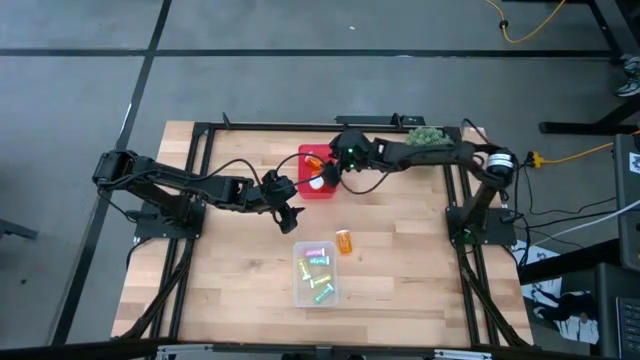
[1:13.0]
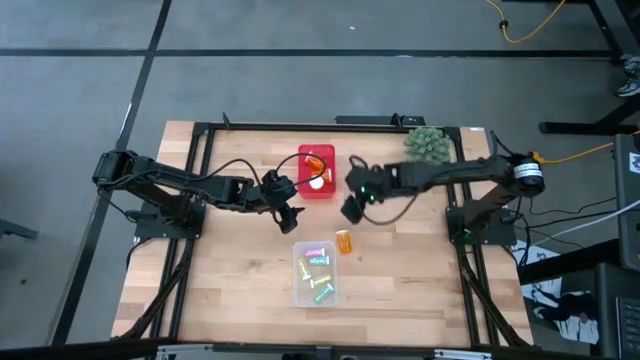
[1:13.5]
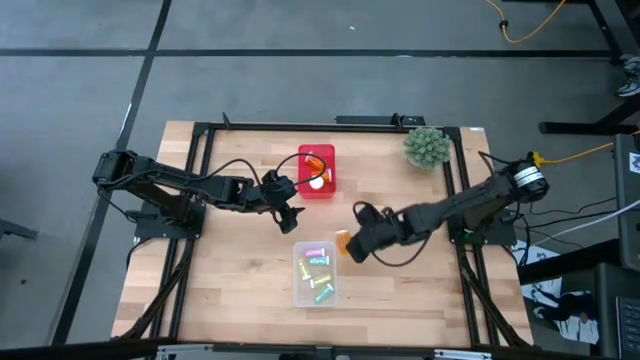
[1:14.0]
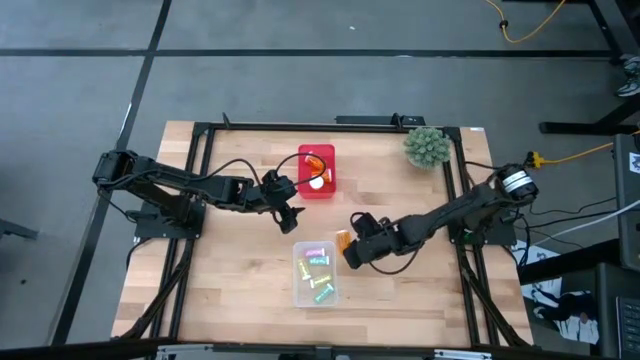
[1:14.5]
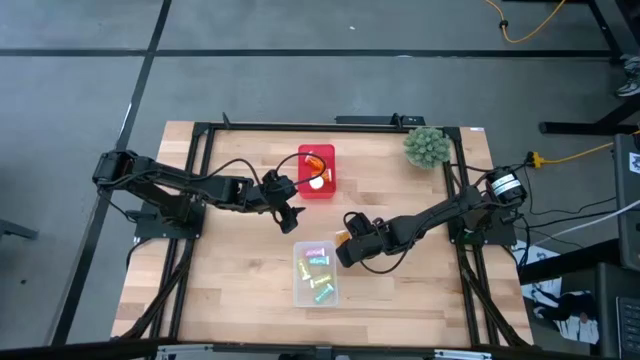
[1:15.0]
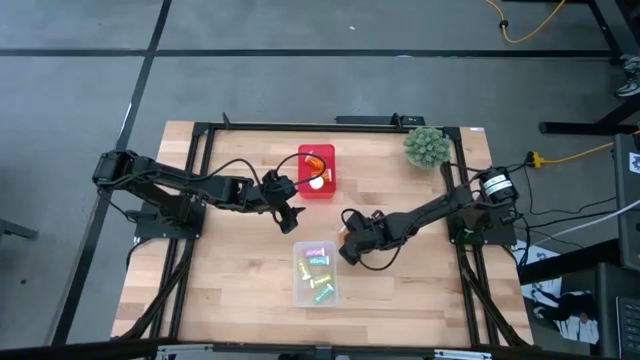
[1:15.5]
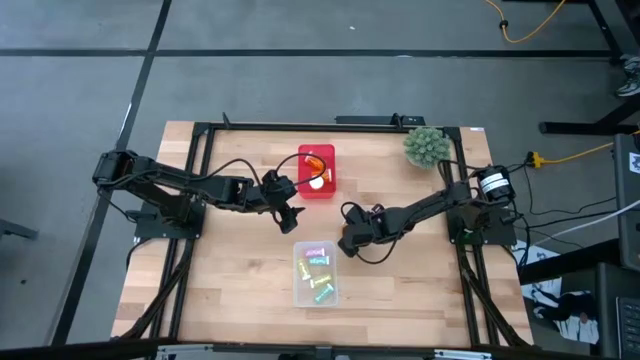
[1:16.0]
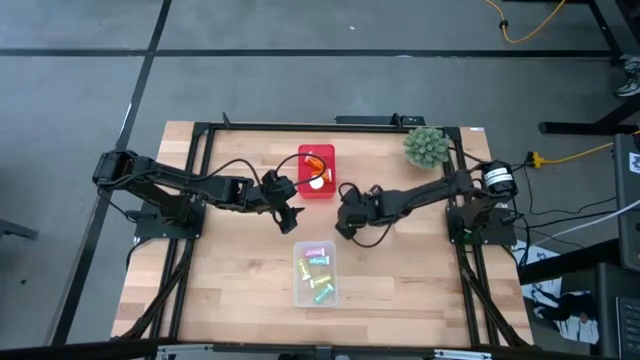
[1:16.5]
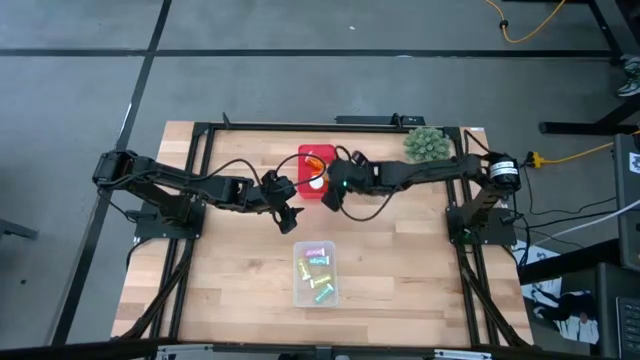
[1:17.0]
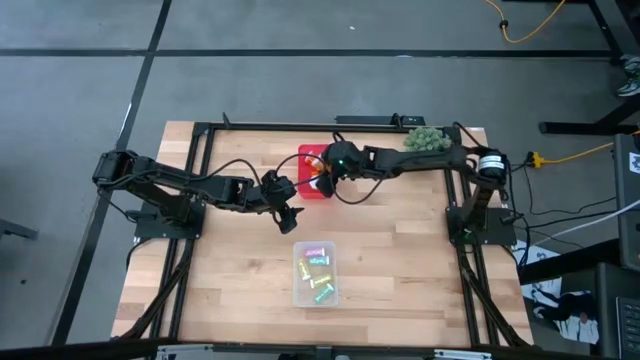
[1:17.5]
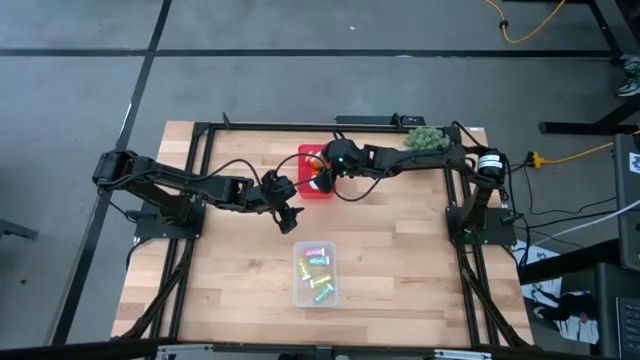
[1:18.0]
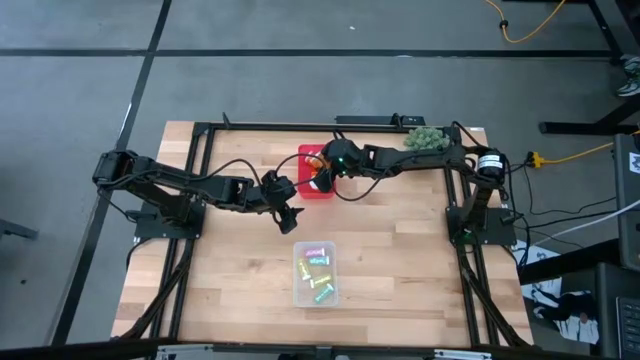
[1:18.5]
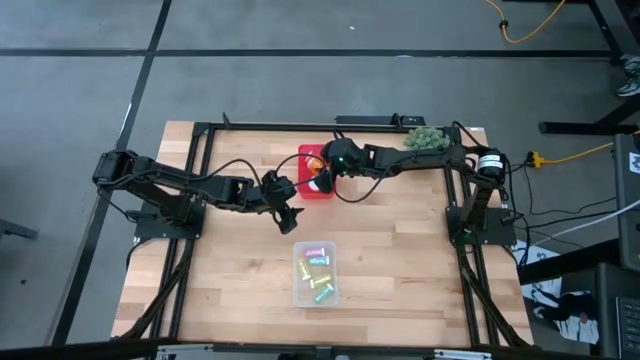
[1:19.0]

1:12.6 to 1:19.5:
Task: Pick and place medicine bottles into bin by pill shape (circle, oval)
Put the large orange pill bottle into the red bin

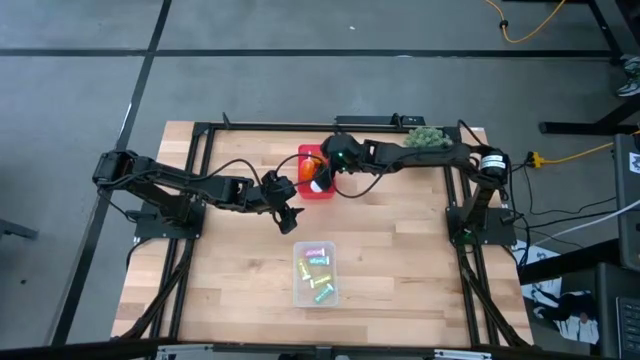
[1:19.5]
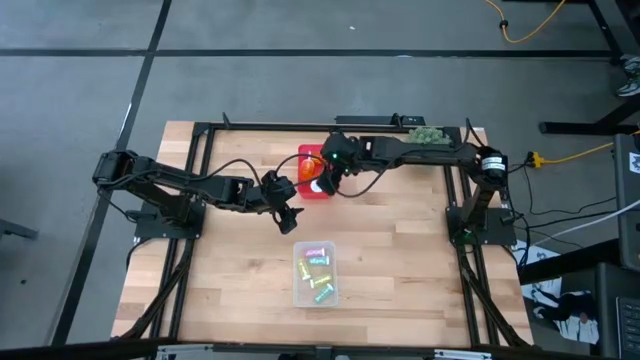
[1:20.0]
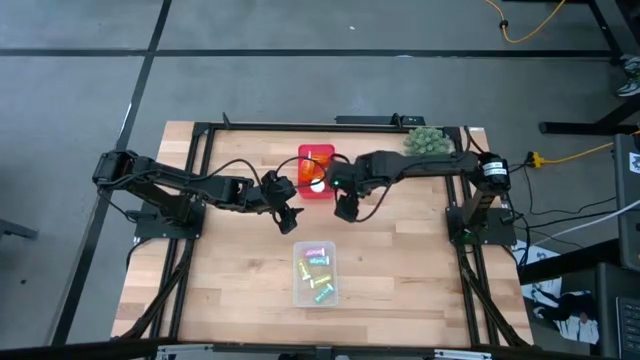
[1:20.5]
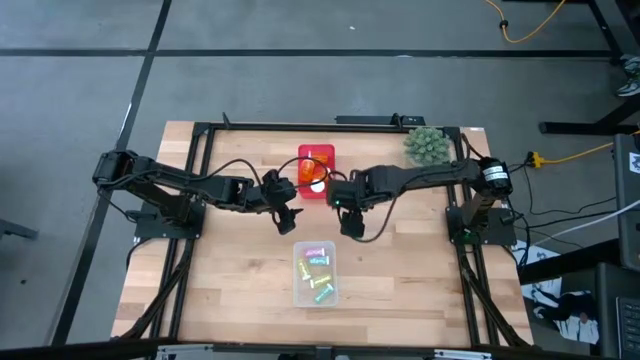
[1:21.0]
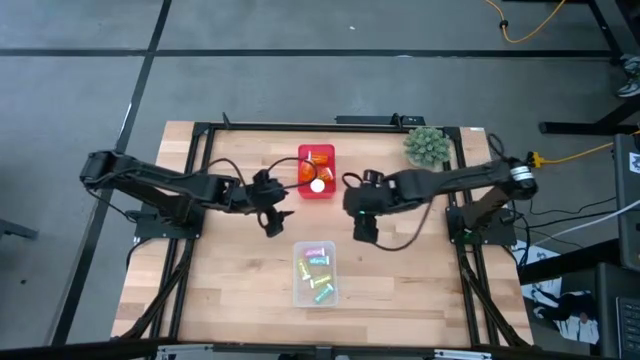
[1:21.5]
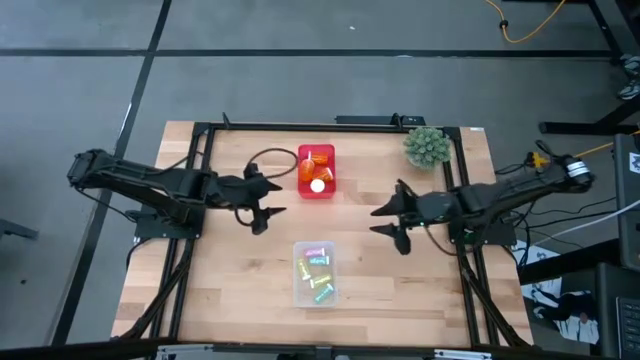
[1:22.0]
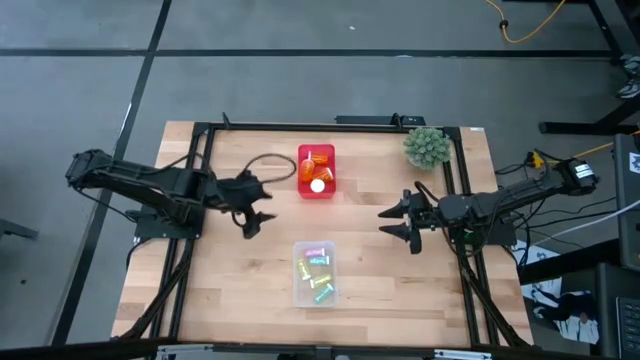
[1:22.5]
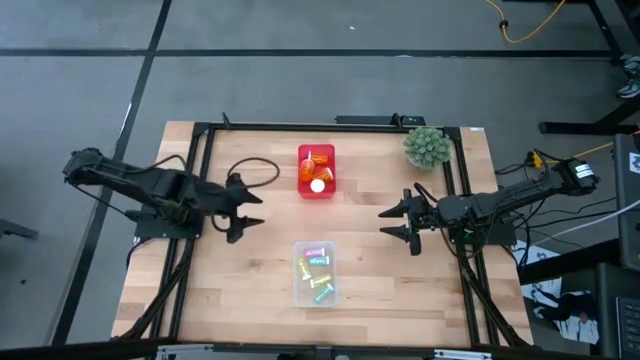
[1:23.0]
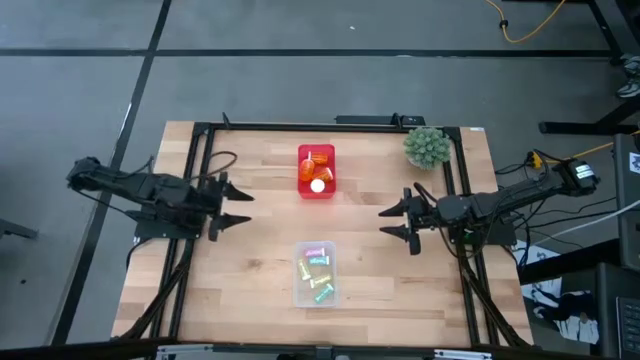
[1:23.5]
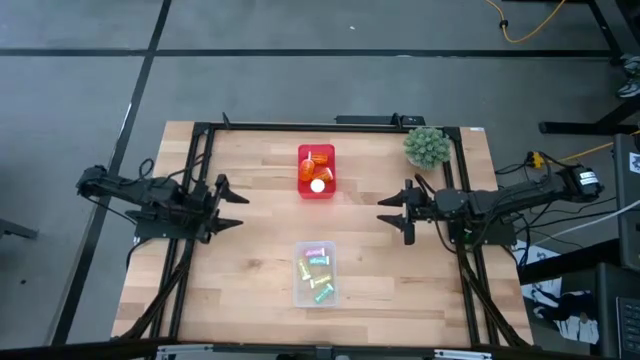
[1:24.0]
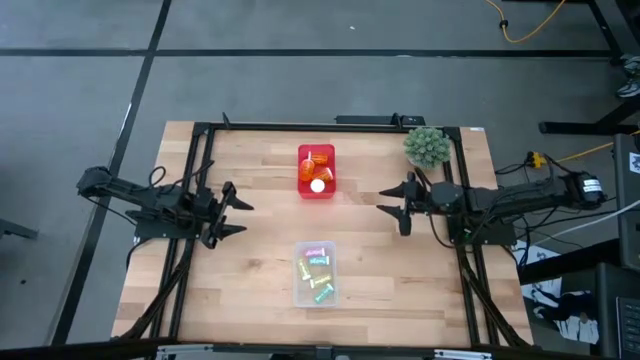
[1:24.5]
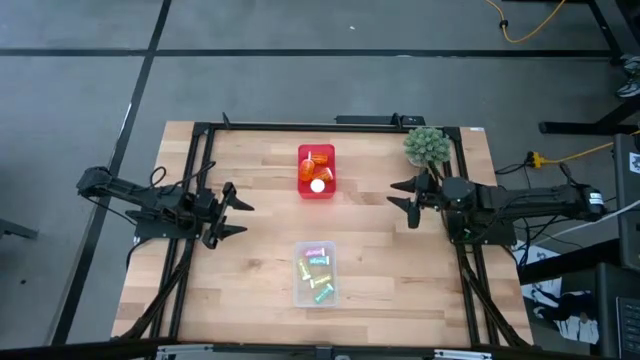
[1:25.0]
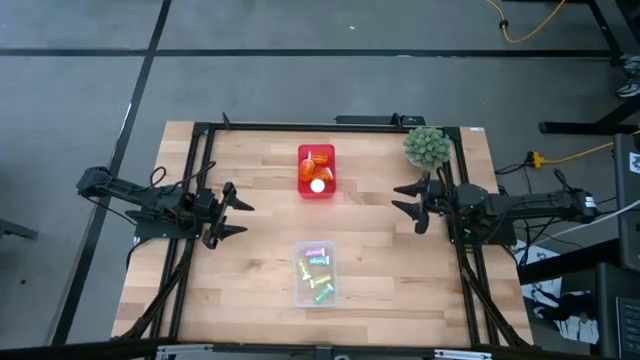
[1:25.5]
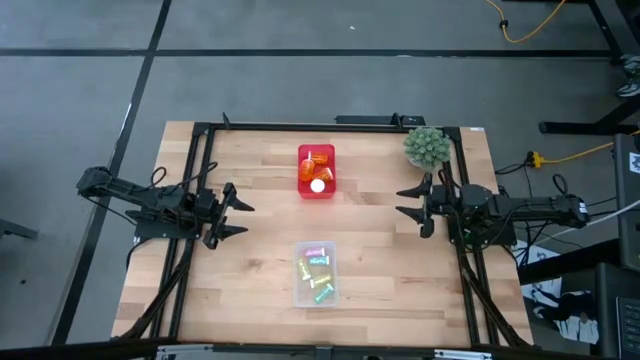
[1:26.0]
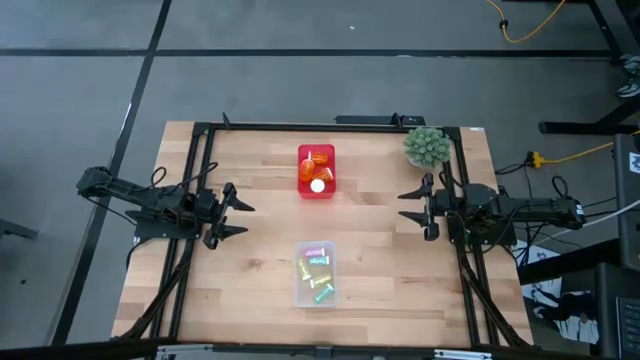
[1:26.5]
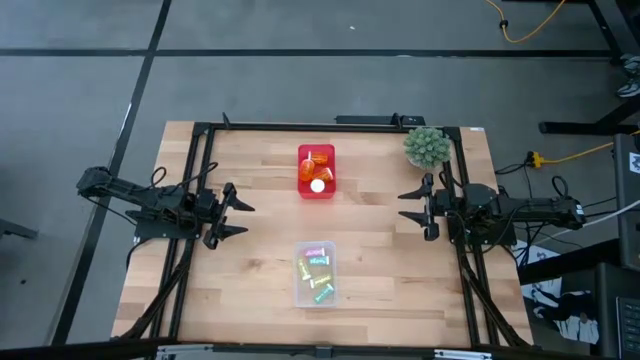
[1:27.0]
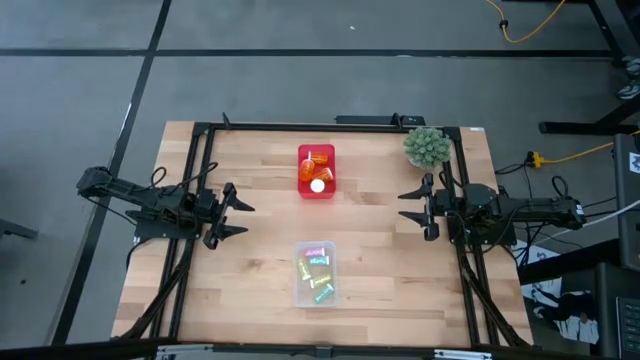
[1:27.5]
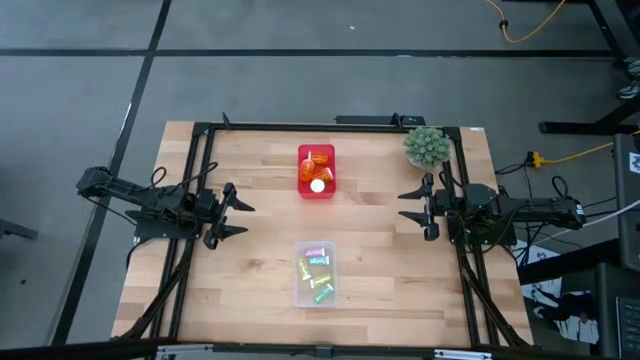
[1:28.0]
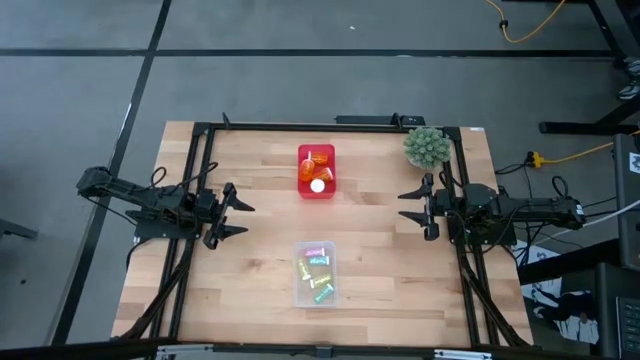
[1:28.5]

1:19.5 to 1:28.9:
Return to Home Position

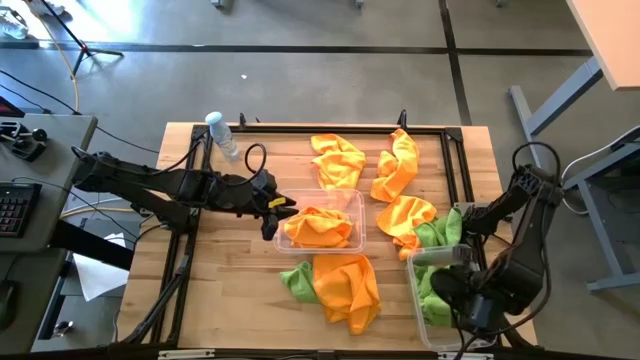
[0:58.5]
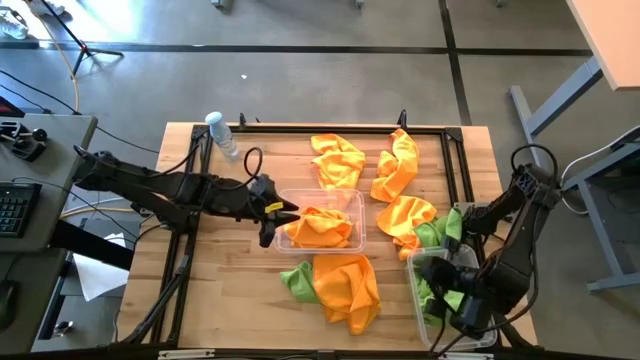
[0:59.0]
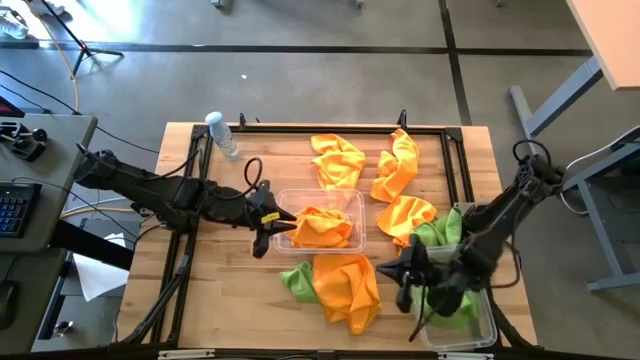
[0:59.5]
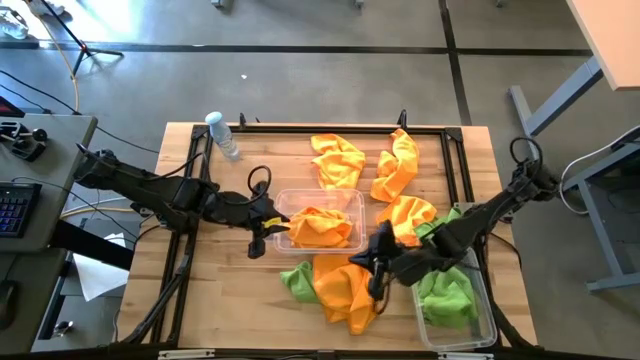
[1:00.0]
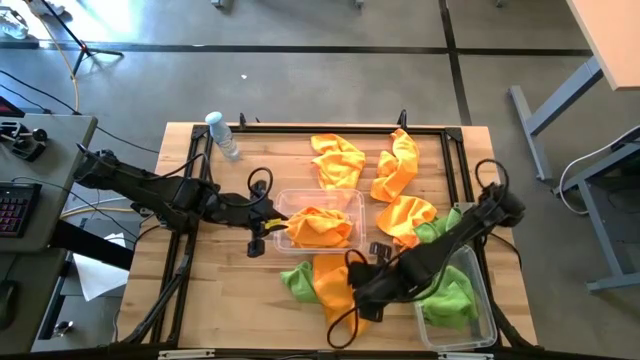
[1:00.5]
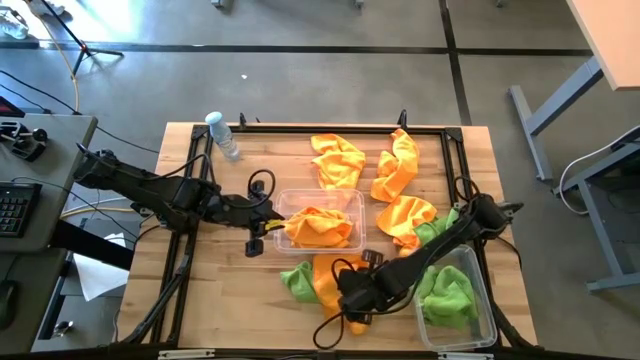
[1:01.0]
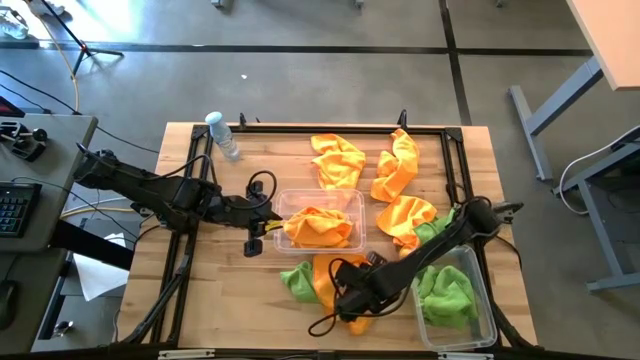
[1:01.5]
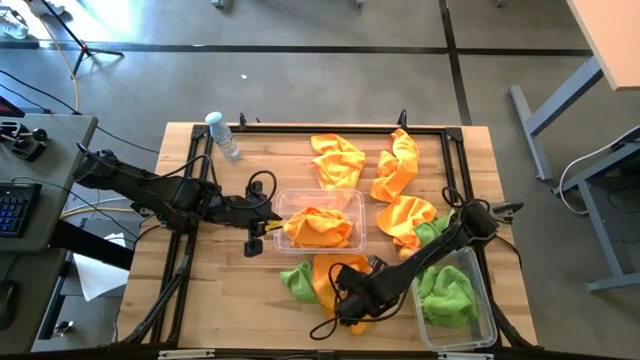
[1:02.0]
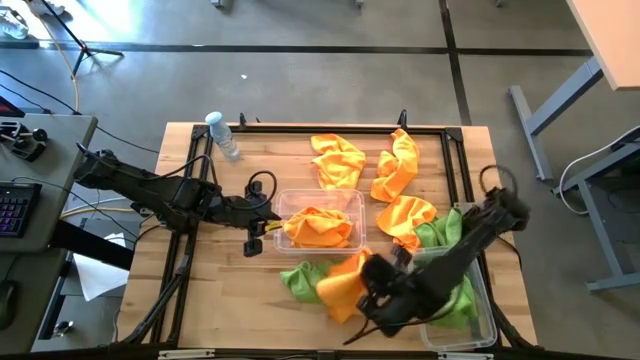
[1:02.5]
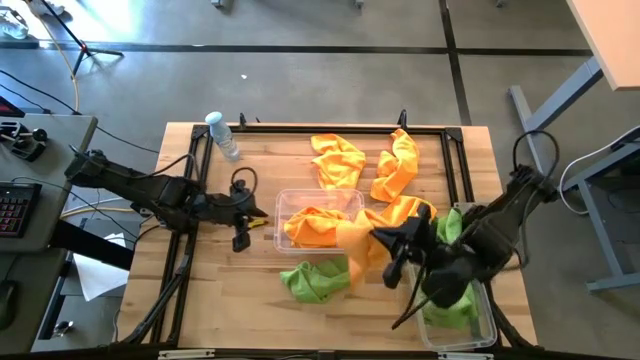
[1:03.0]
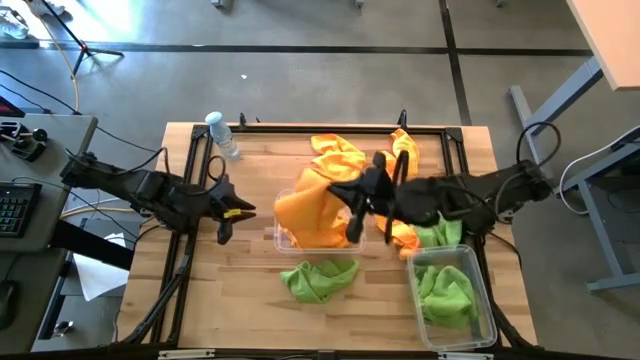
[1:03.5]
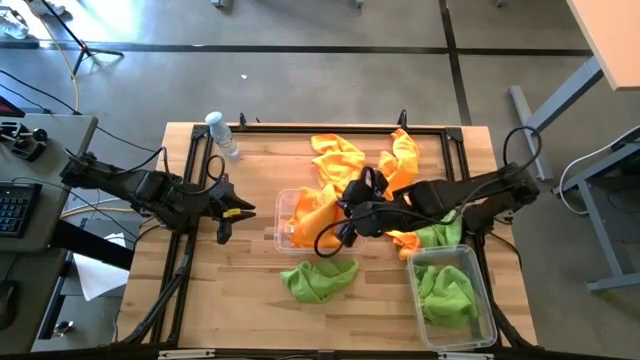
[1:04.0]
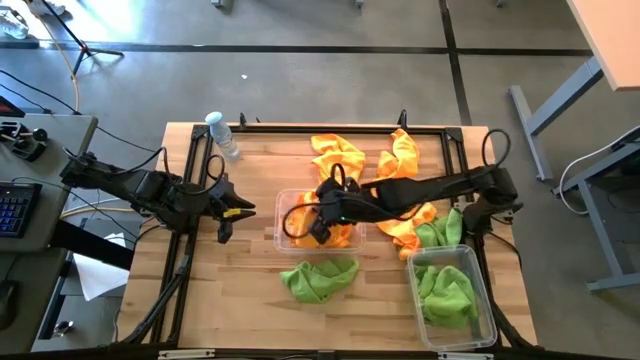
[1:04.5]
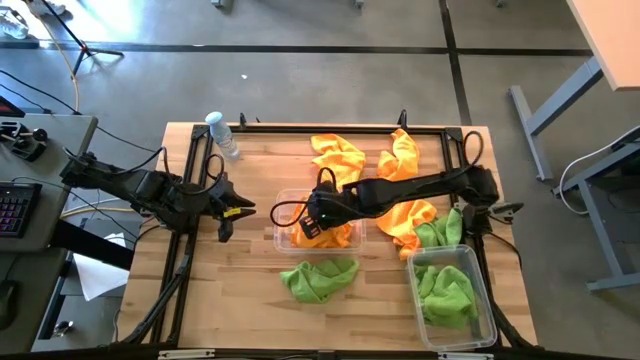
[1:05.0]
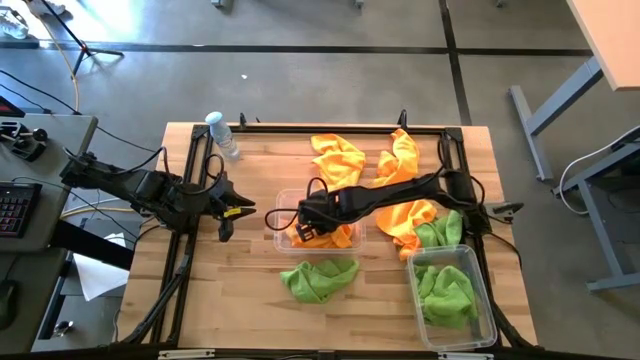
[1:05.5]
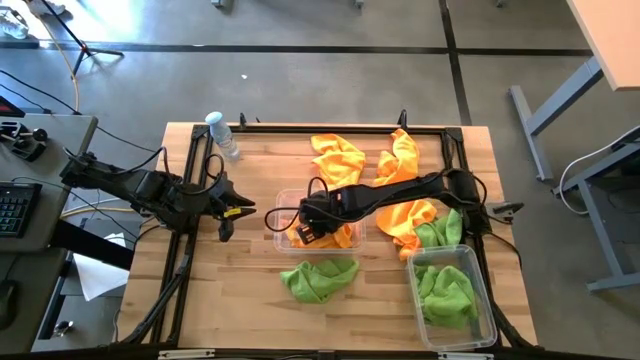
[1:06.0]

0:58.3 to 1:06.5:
Task: Sort microfiber towel by color & place in baskets
Put the orange towel into the top transparent bin
